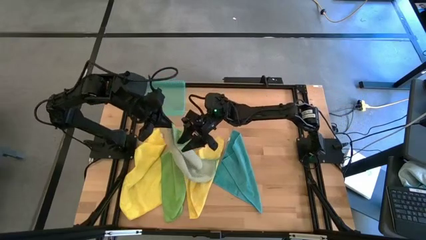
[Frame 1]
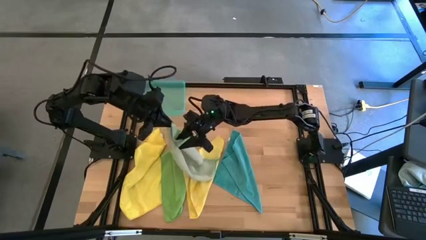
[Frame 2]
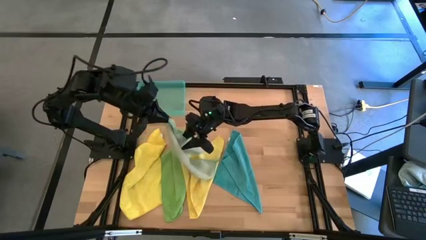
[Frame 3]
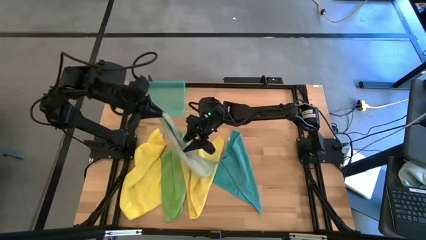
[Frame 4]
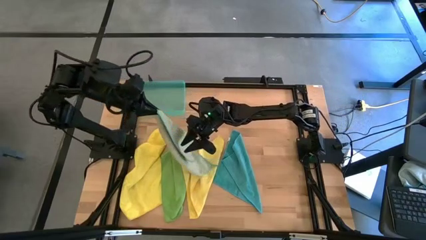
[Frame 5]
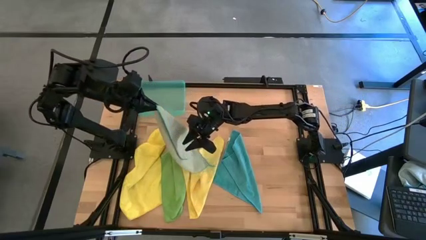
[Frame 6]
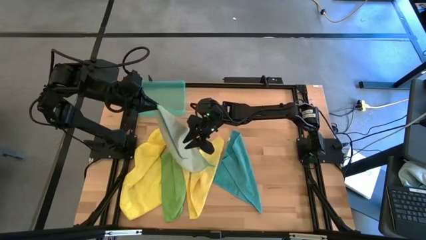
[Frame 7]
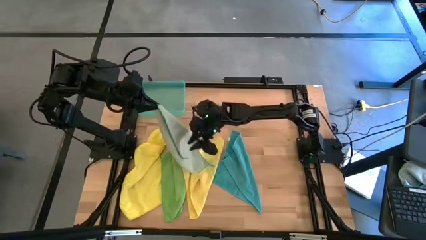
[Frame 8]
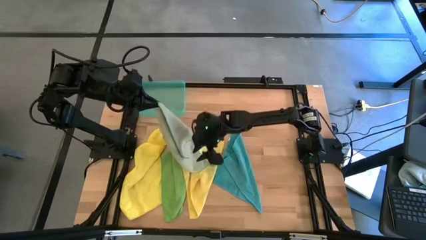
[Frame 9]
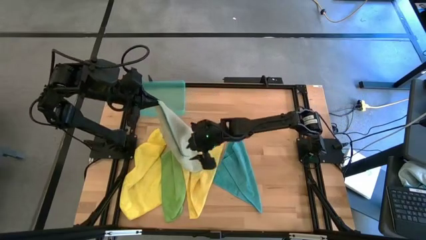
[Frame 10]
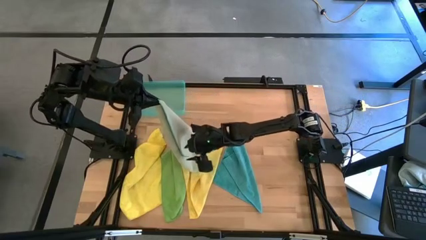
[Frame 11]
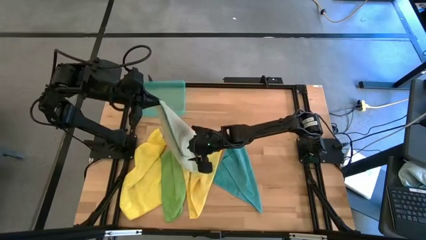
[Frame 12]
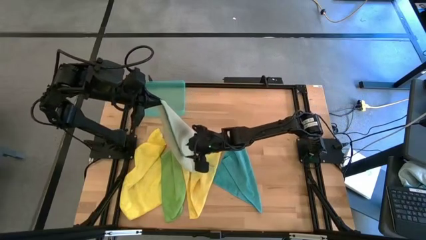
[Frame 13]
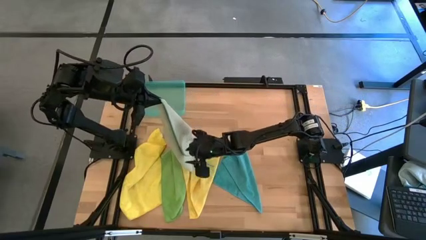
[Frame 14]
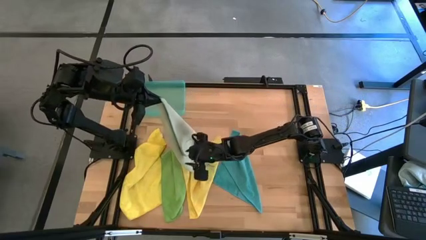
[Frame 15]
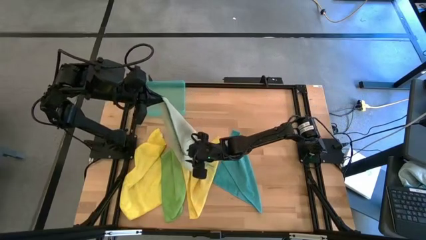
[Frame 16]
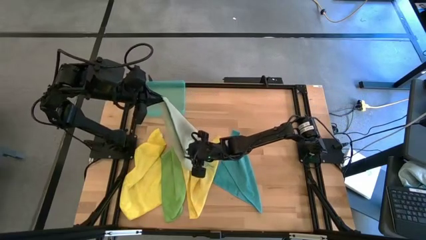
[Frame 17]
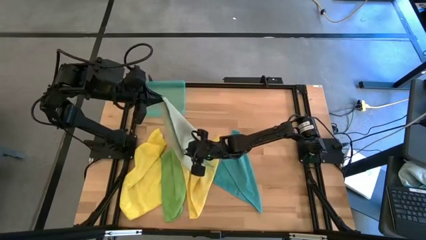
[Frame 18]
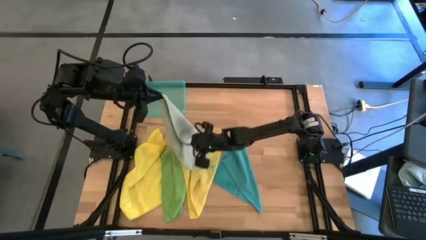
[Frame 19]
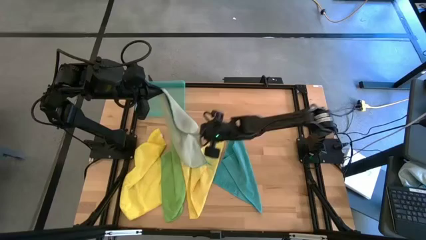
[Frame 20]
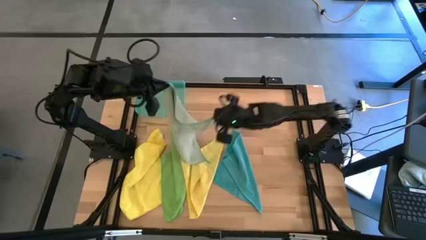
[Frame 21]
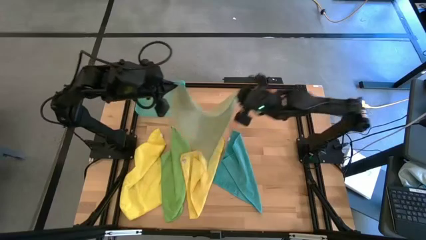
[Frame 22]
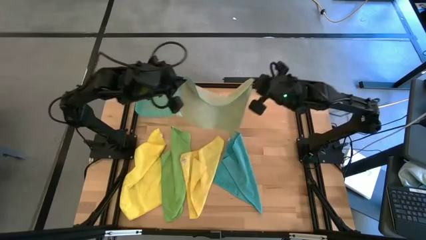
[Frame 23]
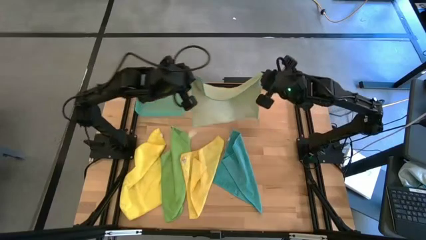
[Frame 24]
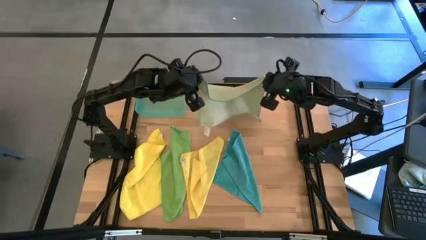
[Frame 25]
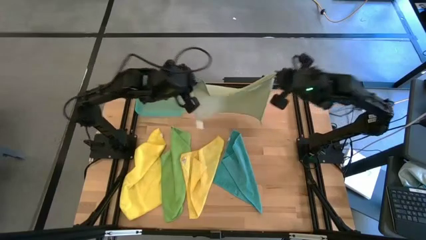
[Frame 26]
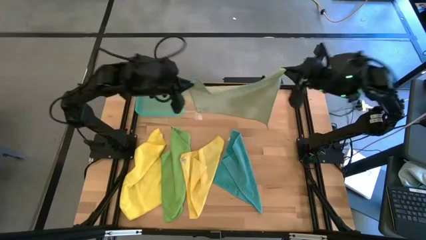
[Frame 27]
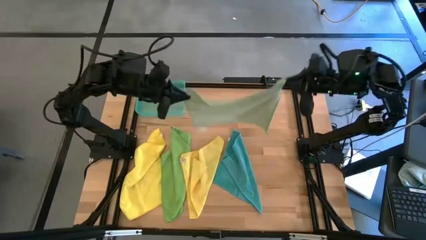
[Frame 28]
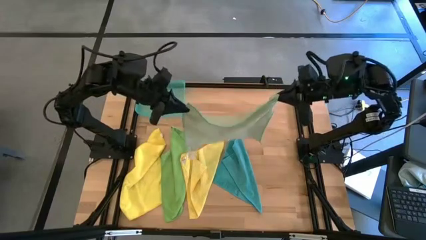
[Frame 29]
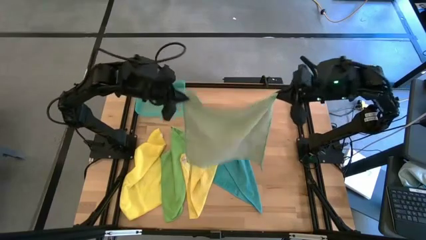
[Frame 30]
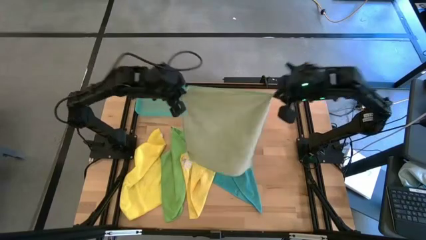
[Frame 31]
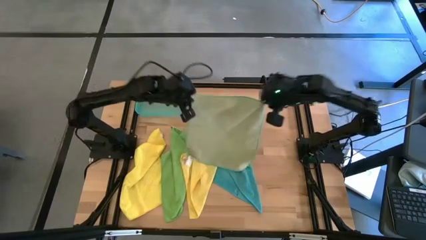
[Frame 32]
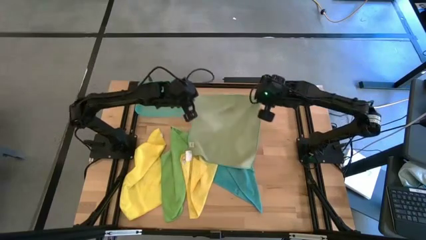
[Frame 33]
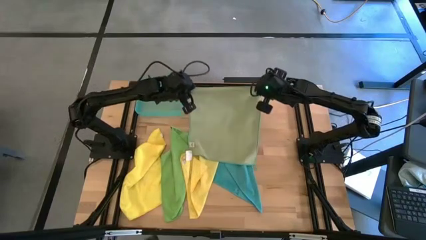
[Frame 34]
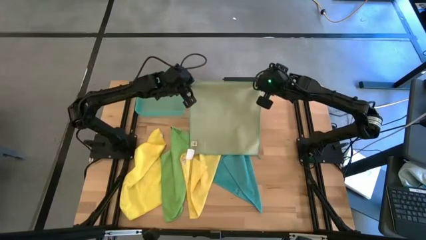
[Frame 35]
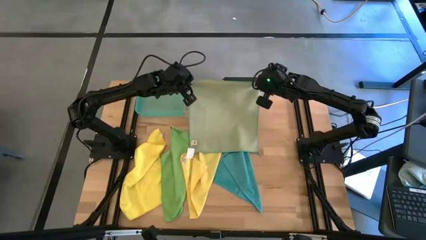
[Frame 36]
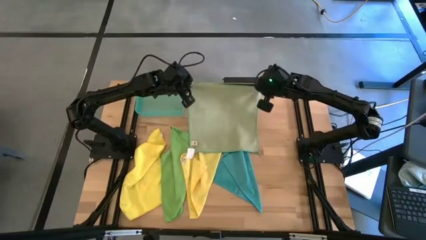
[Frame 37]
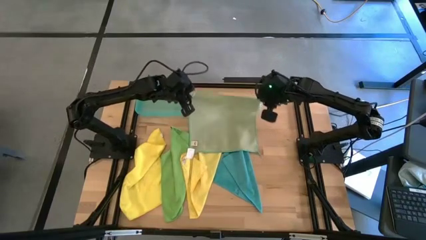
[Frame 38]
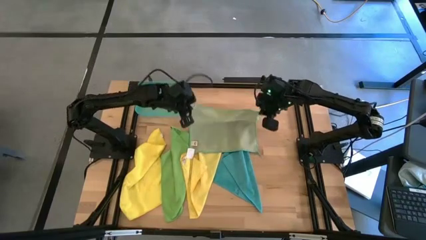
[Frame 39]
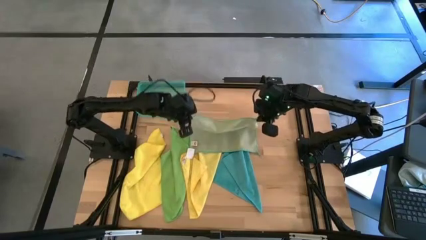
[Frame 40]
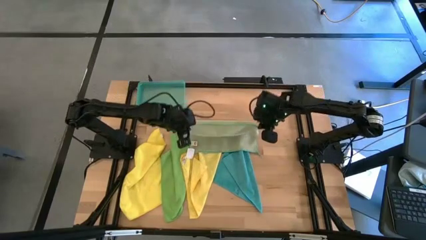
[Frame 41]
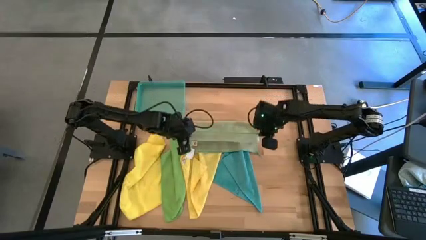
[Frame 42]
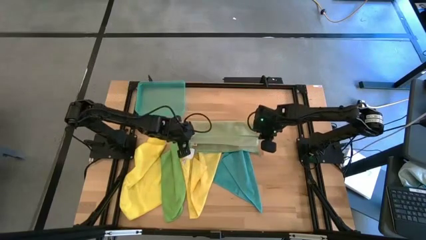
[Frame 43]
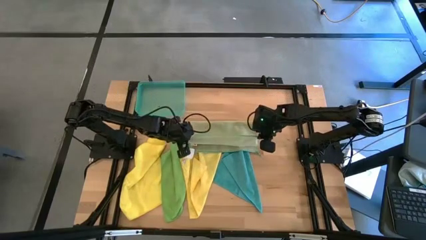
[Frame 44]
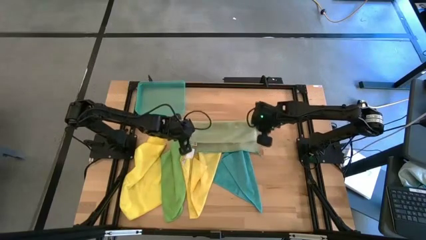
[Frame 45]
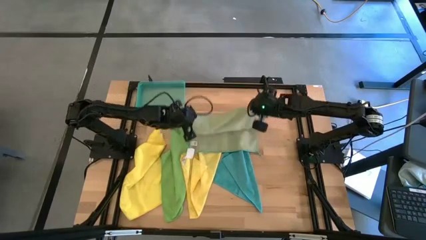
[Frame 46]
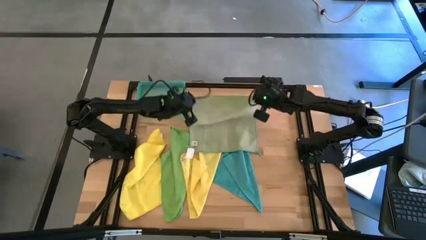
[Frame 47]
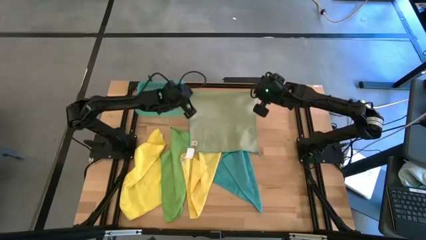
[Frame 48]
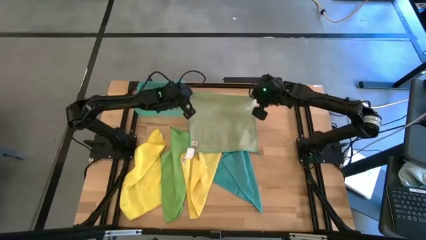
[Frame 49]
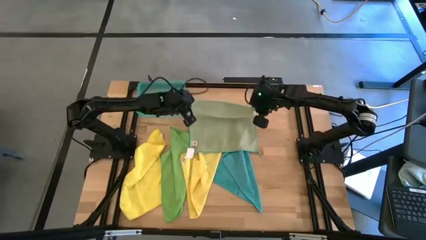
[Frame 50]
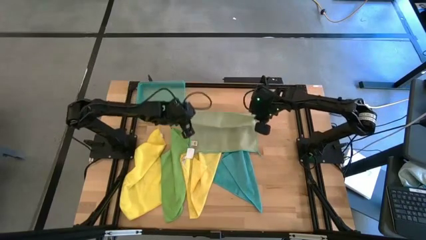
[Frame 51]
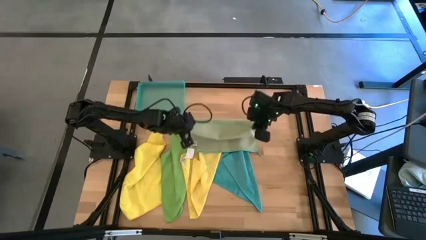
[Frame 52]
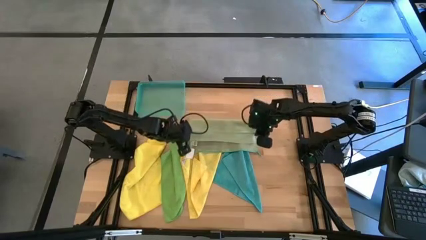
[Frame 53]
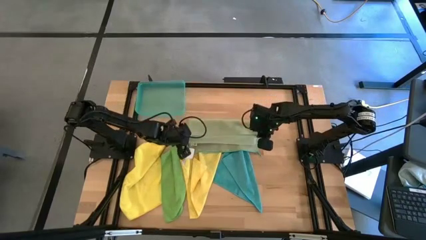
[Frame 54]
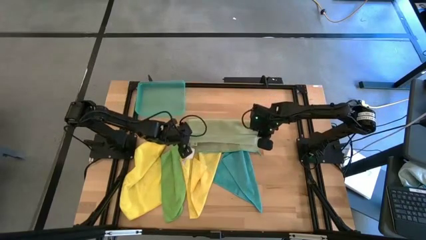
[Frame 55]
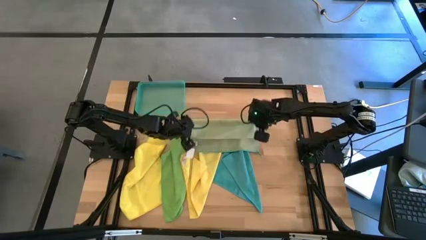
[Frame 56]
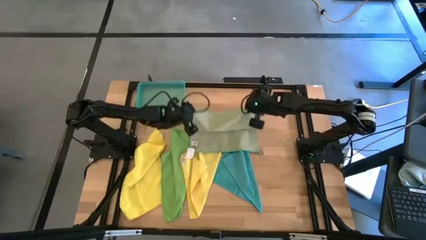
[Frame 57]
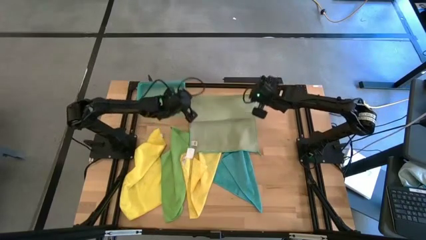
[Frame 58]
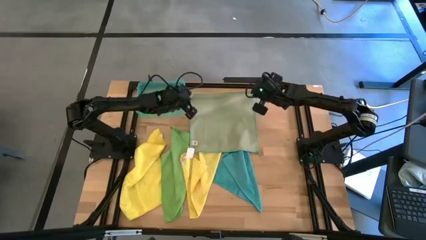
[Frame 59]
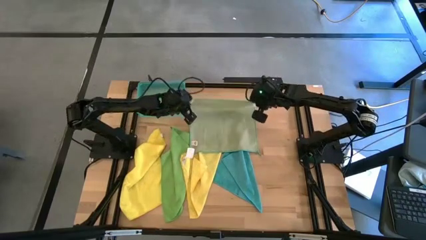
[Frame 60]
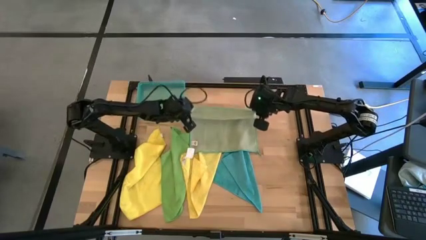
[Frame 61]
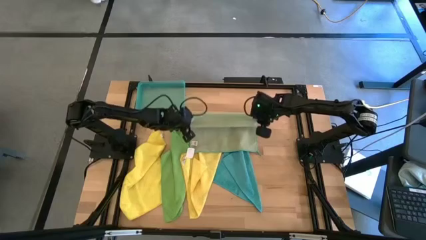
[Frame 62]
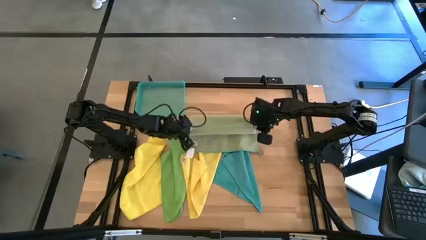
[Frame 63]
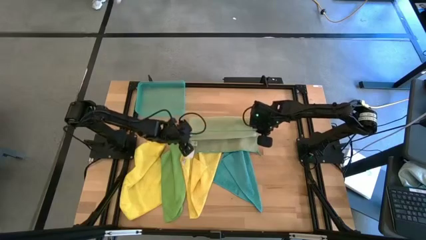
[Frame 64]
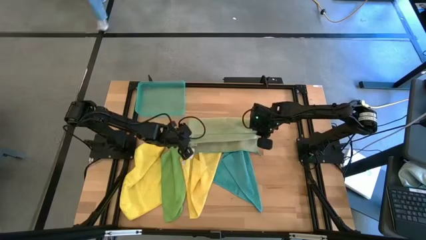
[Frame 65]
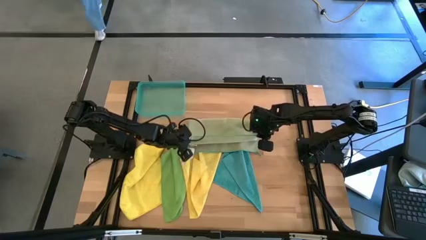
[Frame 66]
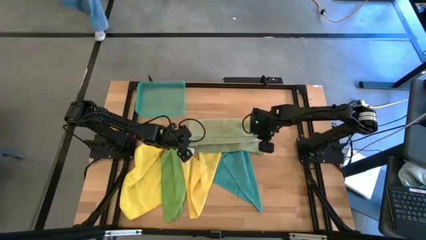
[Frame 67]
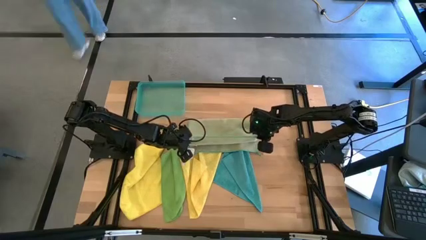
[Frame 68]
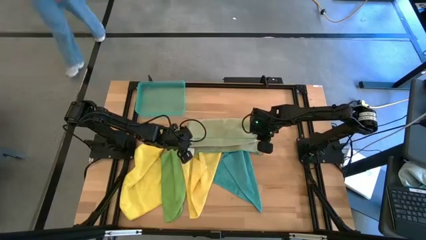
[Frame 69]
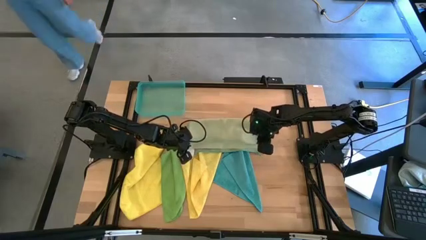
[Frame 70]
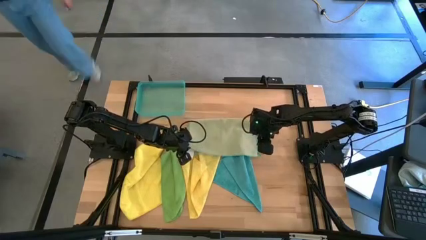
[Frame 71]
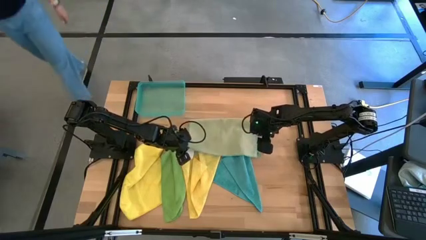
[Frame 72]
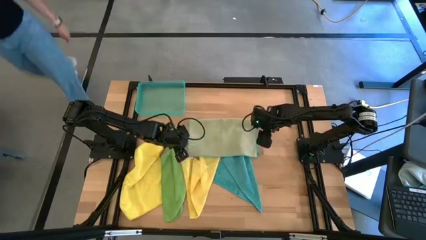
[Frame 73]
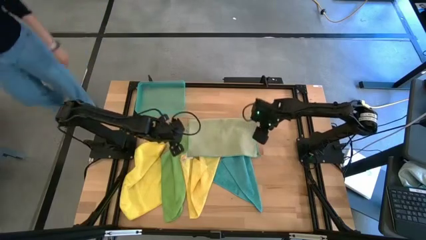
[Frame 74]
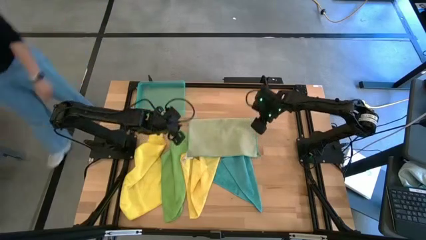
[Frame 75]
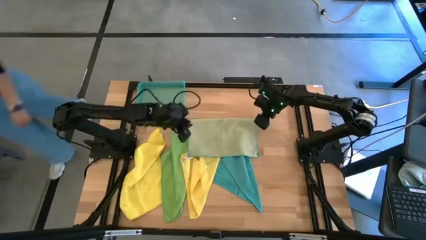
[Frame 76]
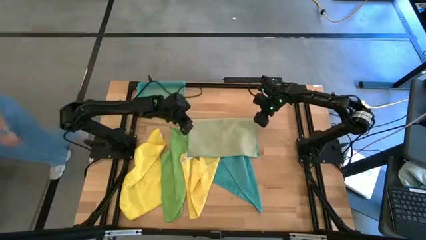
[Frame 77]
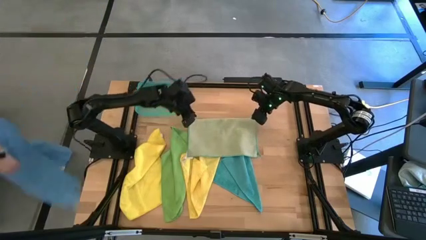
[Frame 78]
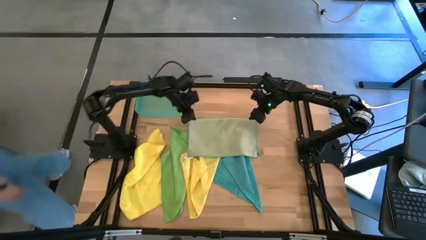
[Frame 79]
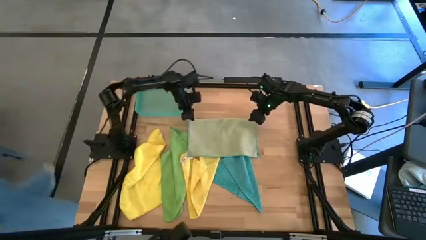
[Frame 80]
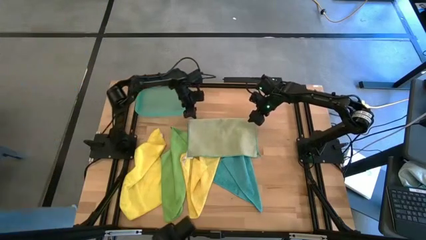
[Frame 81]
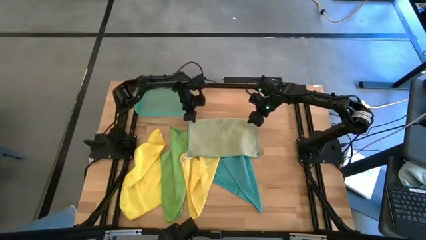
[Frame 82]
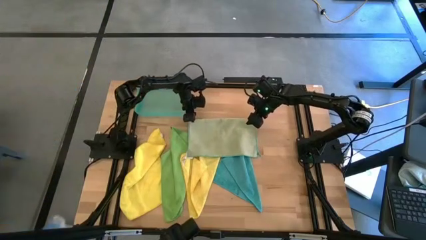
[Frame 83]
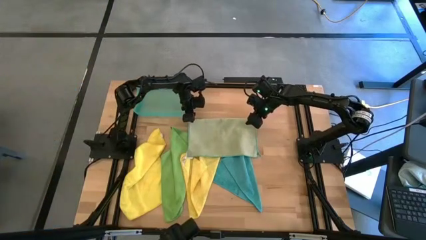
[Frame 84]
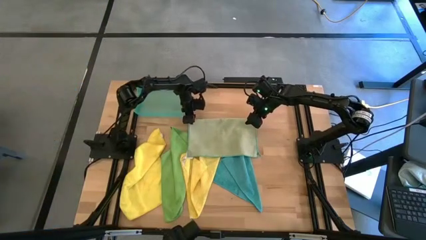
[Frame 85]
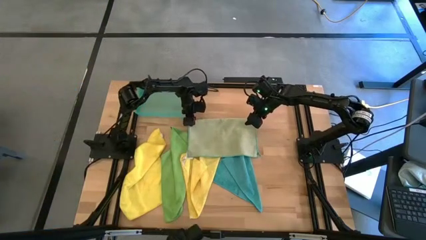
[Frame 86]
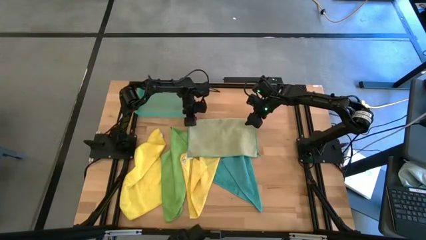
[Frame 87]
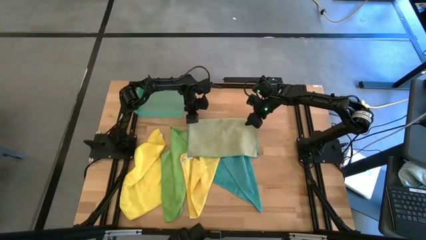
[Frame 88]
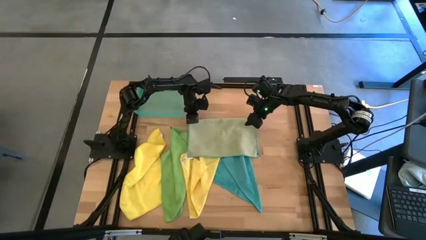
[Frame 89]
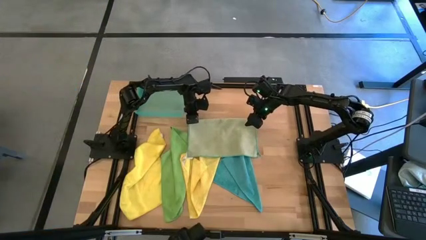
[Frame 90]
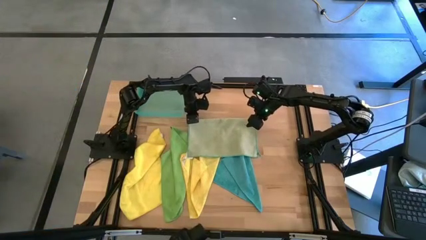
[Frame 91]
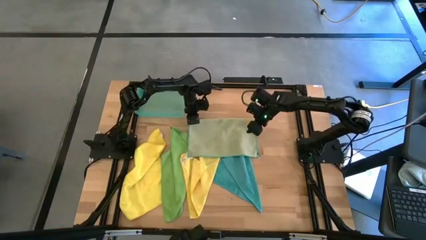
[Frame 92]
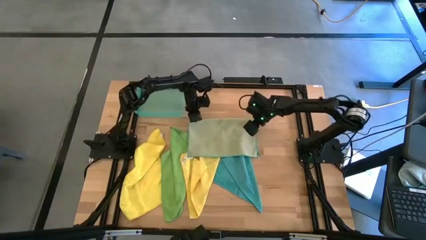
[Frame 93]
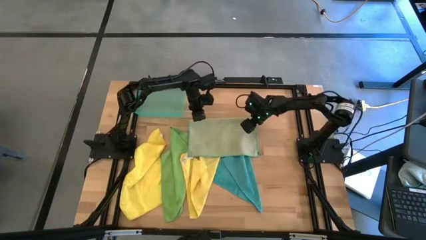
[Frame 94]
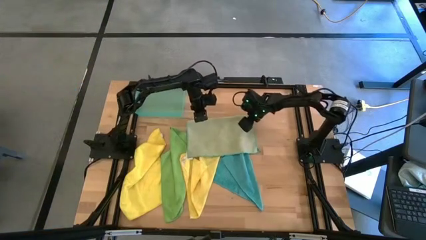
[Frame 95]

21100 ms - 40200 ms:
Task: Fold microfiber towels
Fold the light green microfiber cloth
